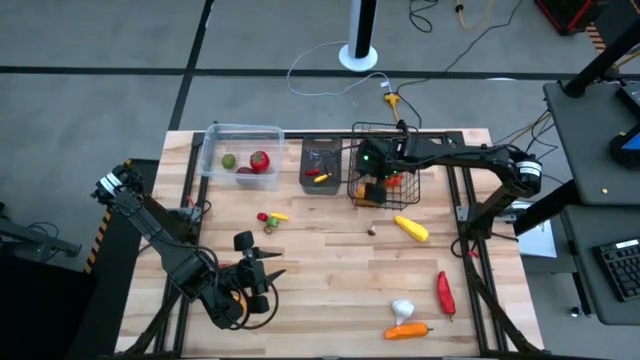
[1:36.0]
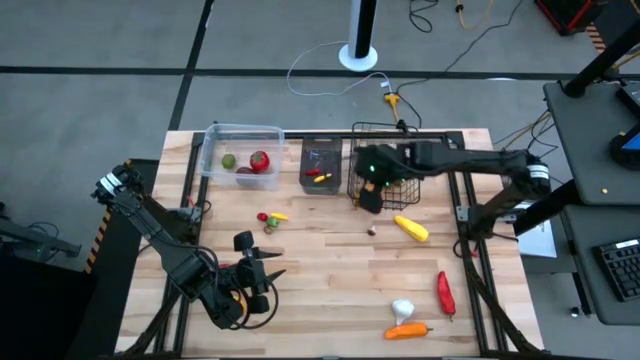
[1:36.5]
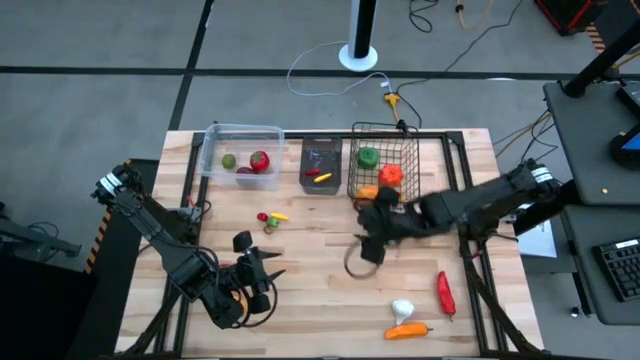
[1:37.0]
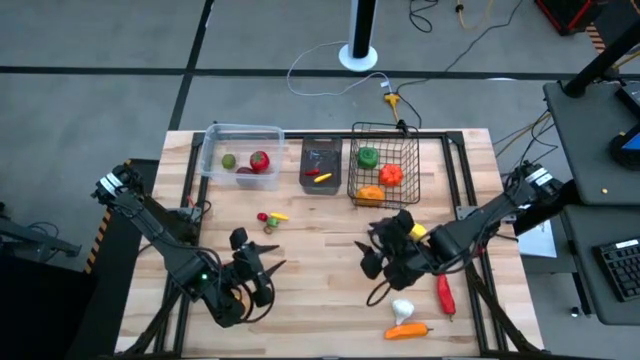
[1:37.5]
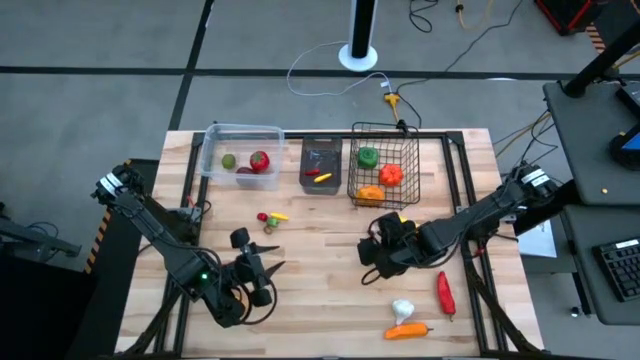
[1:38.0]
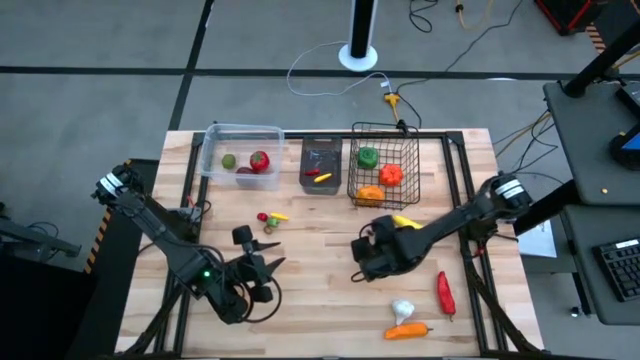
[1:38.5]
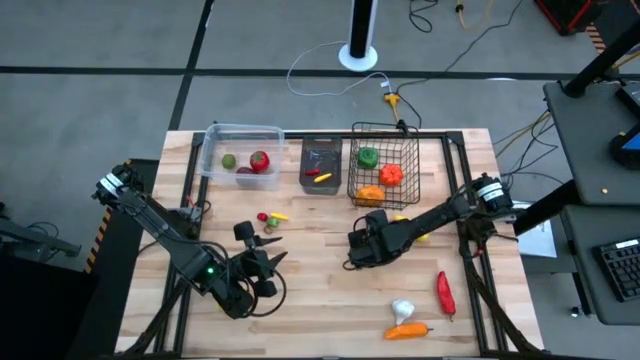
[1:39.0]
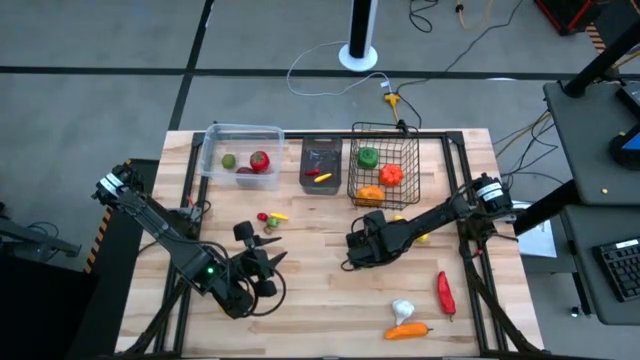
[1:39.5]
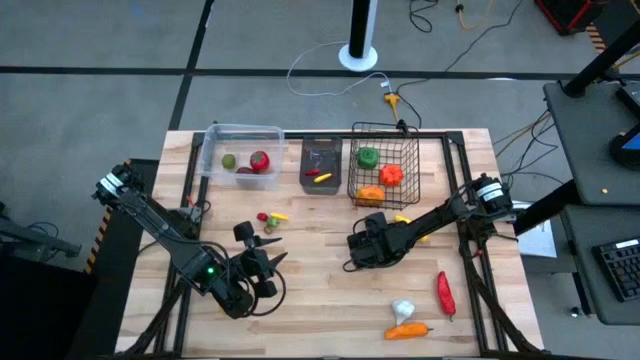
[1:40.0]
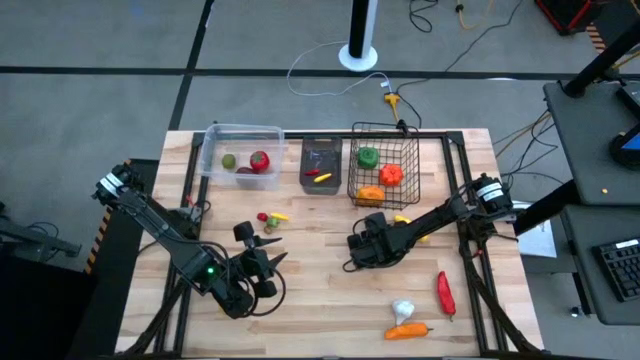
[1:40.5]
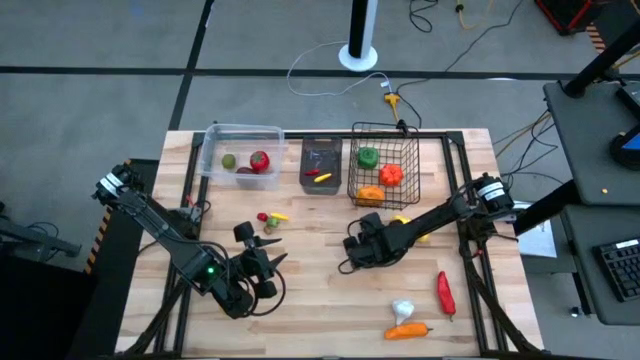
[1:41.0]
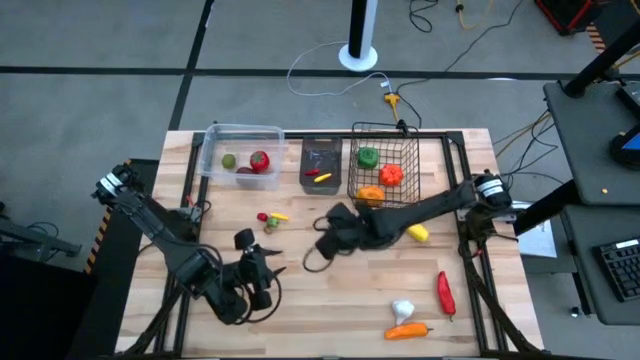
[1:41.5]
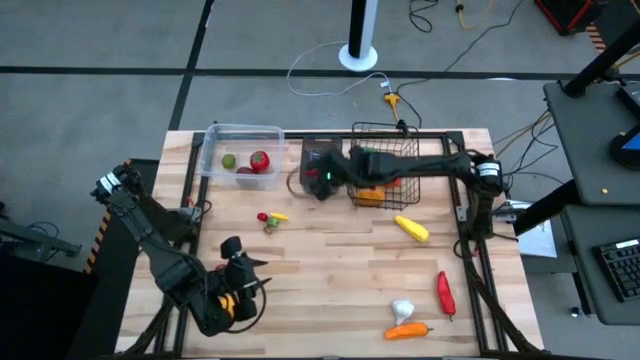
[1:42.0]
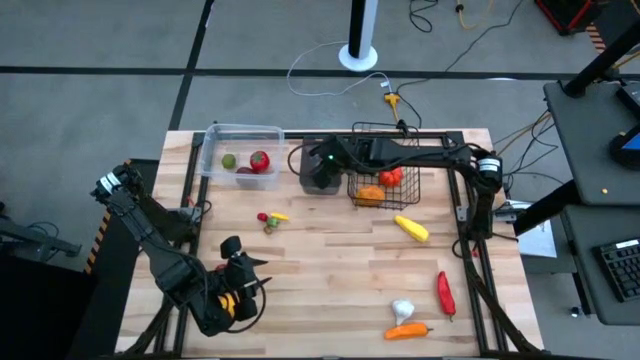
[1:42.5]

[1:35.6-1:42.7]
Task: Sort produce into baskets
Put the brown mushroom into the black bin

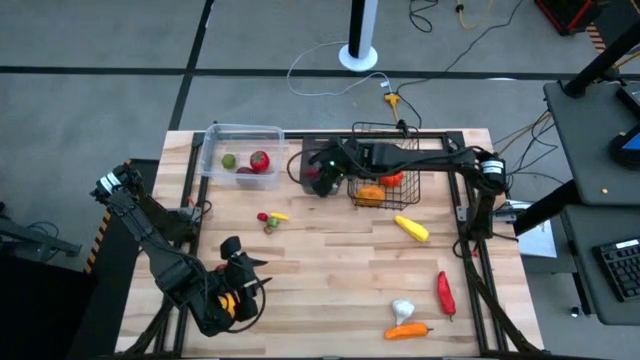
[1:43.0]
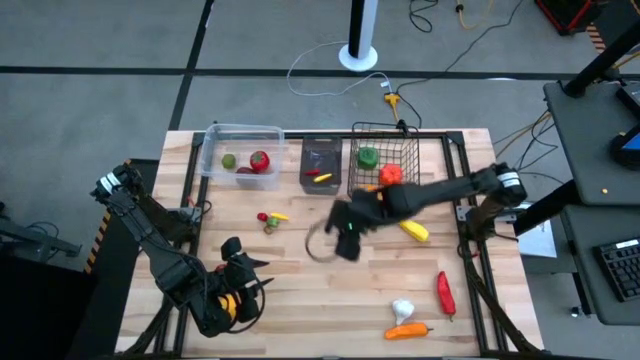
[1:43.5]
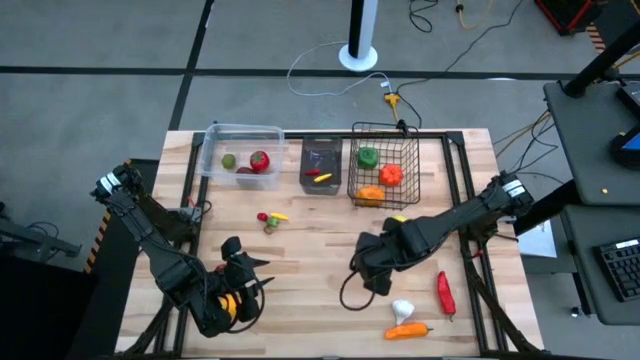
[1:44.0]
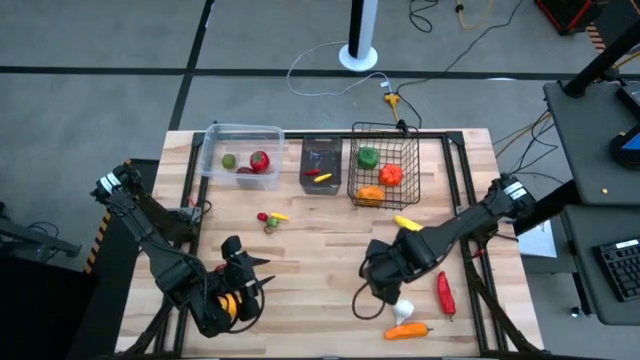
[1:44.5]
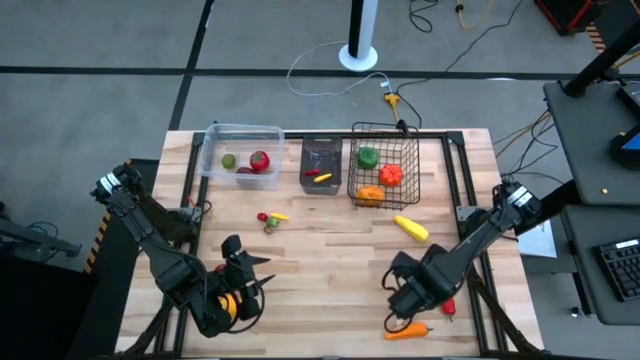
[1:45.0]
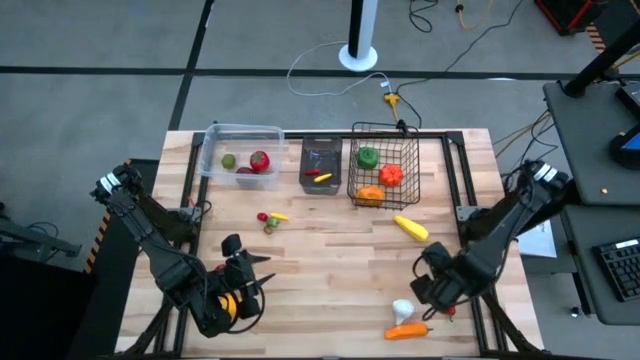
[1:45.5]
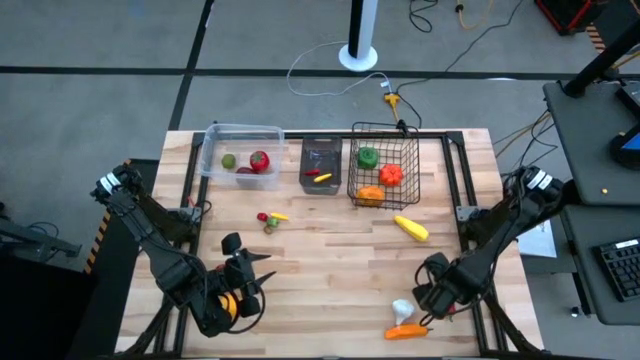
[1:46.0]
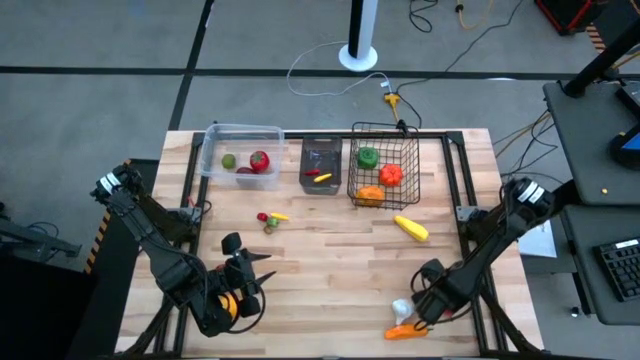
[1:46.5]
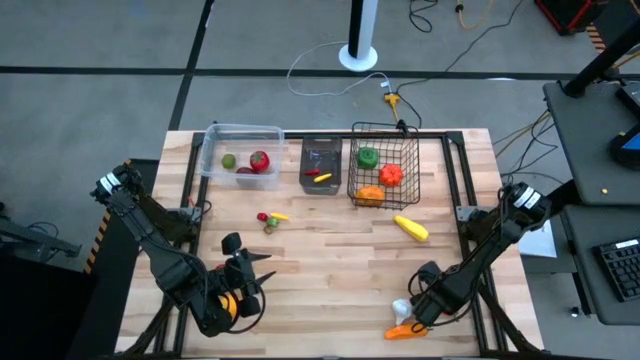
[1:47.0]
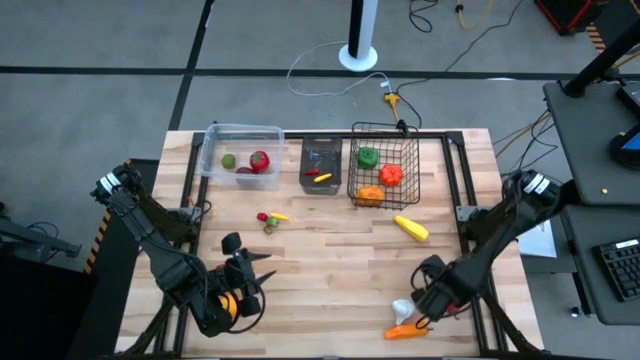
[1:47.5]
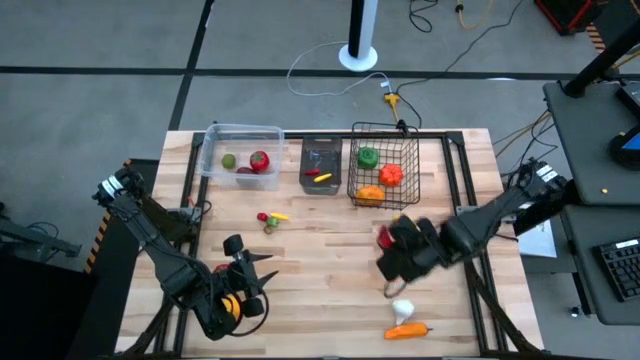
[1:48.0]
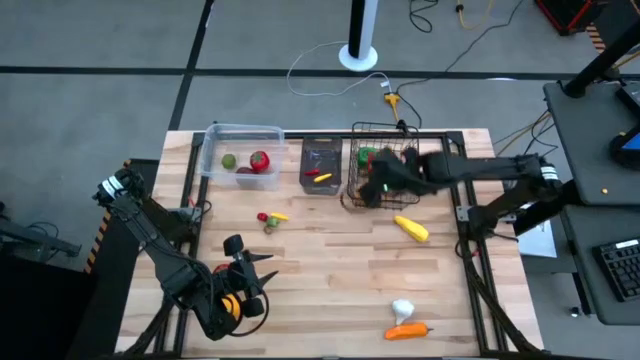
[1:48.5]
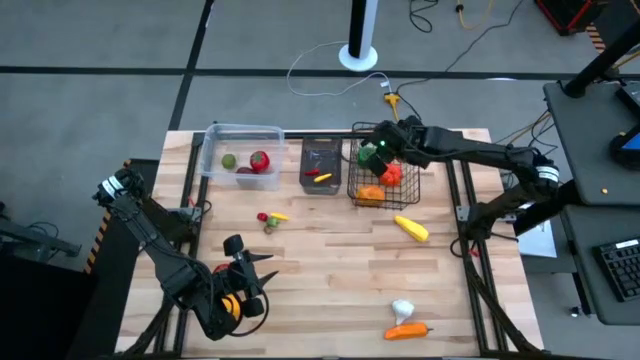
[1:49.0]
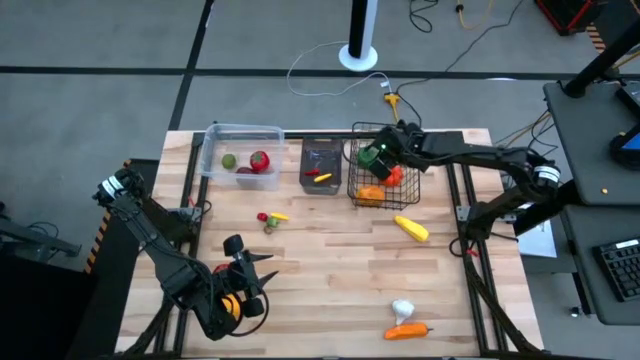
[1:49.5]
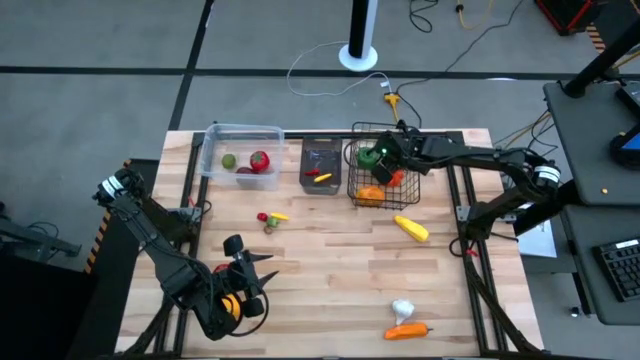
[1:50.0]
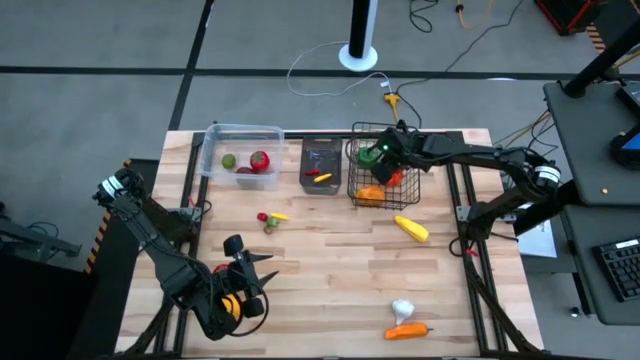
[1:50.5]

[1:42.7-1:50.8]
Put the red chili pepper into the wire basket

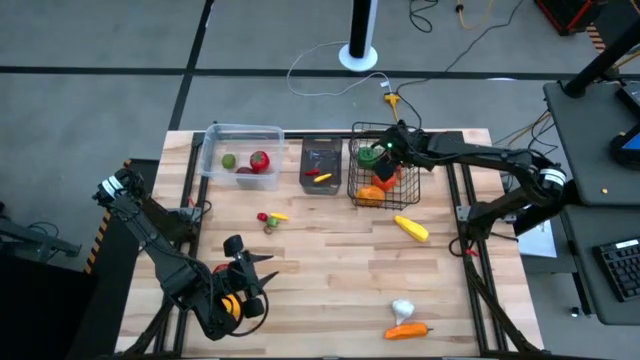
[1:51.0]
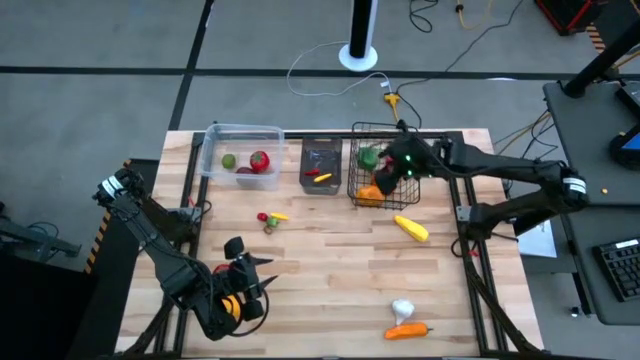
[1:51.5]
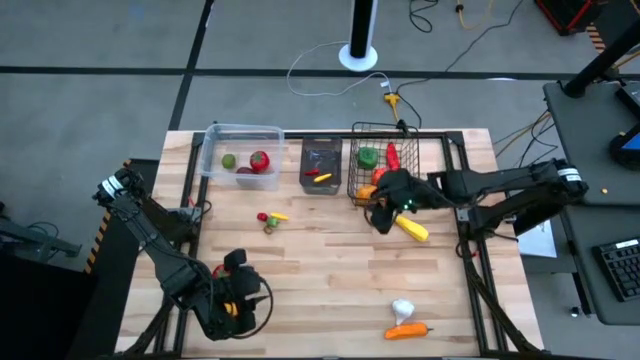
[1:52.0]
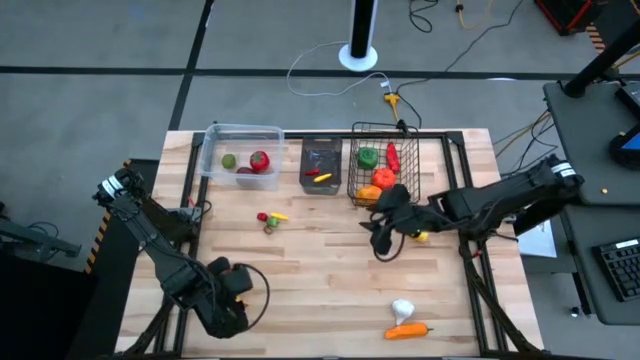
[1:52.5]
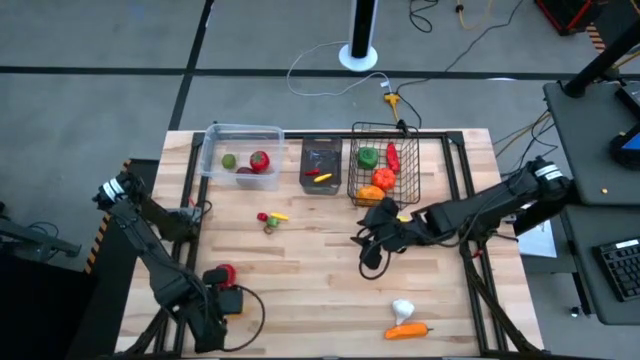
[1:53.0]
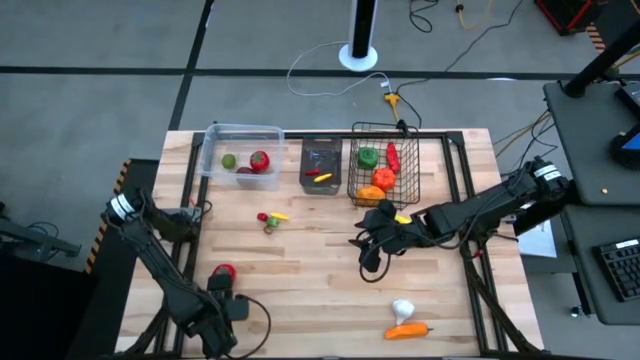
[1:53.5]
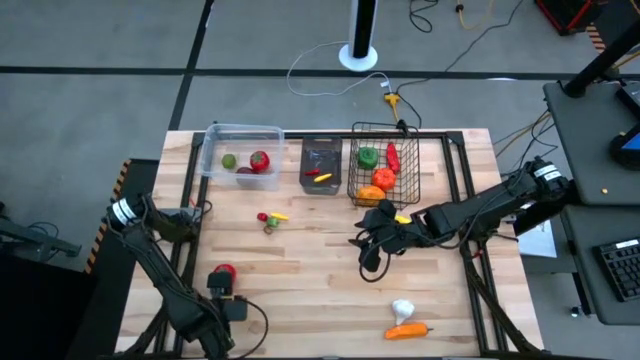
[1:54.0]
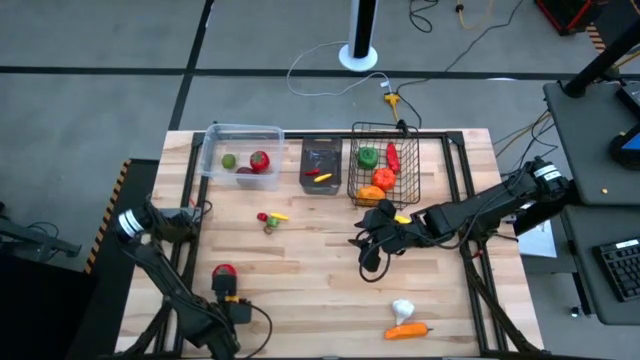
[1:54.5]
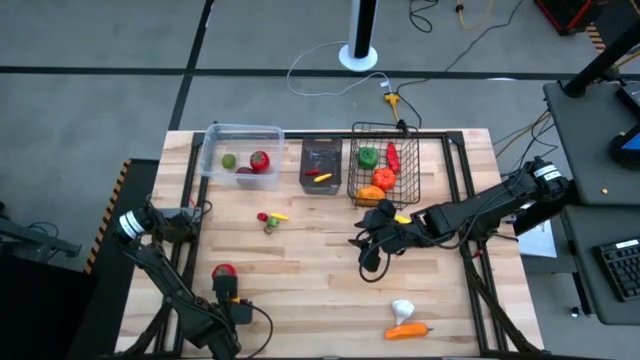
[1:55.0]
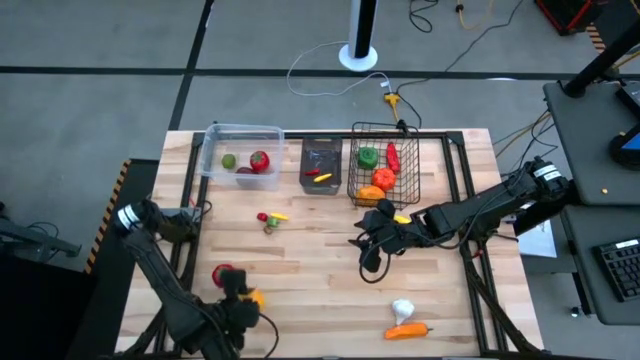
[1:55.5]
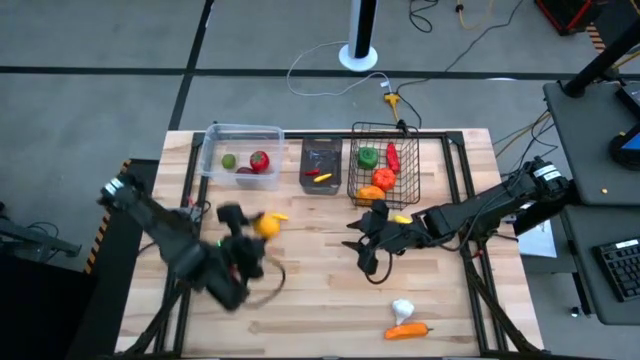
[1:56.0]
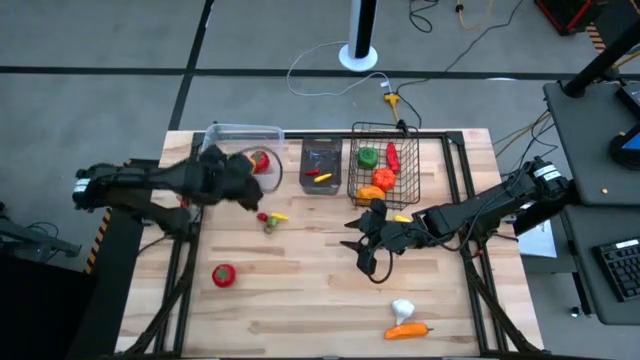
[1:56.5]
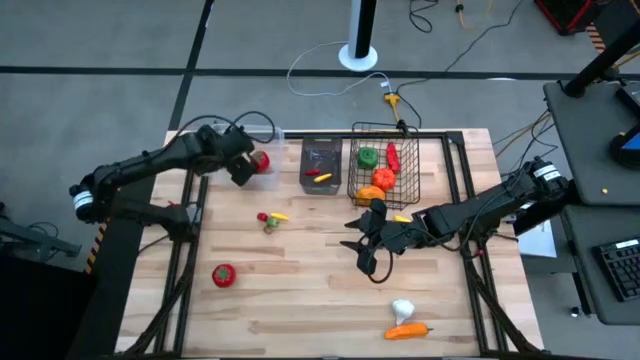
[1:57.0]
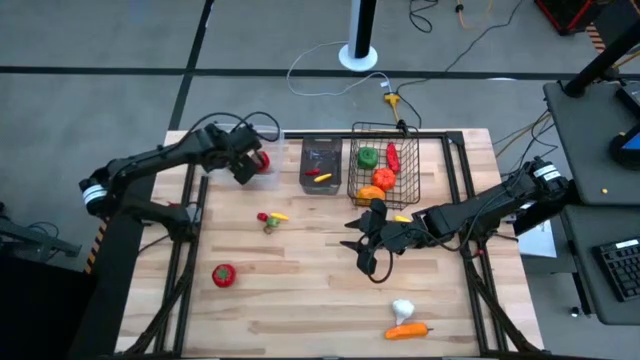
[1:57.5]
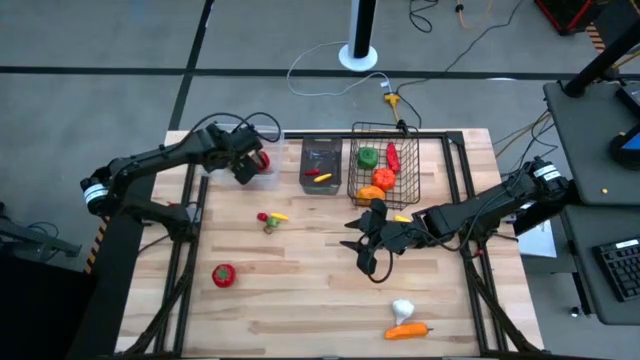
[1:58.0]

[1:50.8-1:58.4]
Put the yellow lemon into the transparent bin
